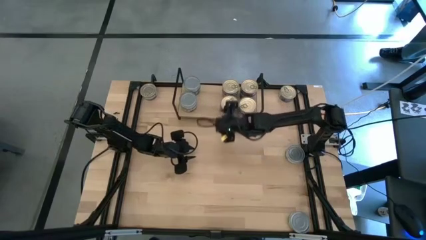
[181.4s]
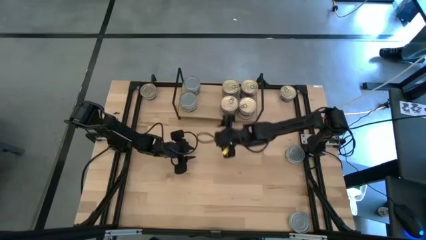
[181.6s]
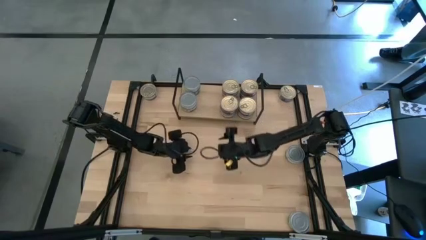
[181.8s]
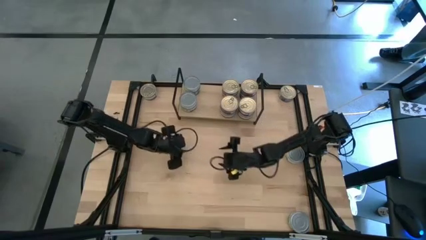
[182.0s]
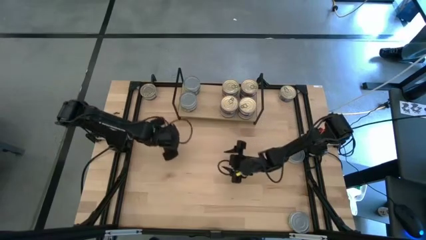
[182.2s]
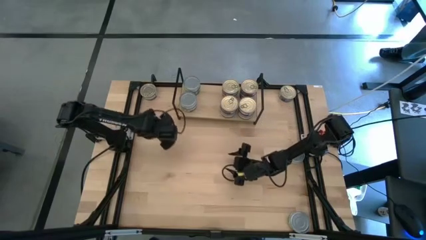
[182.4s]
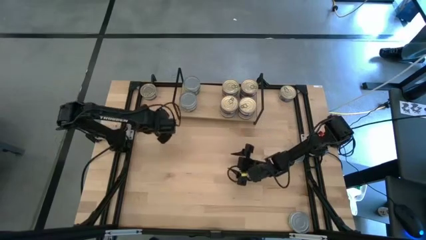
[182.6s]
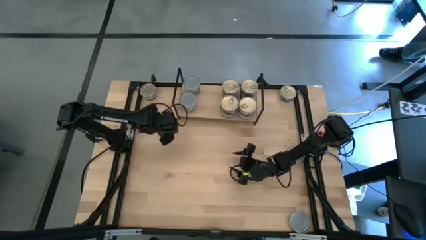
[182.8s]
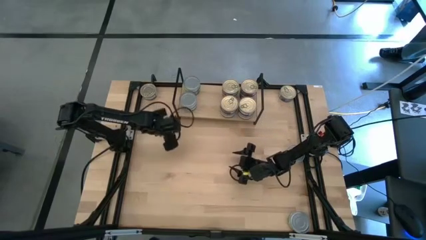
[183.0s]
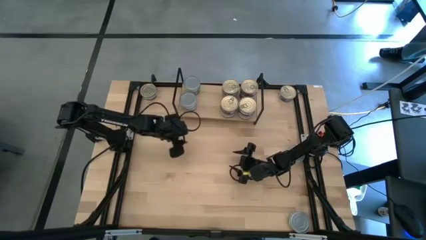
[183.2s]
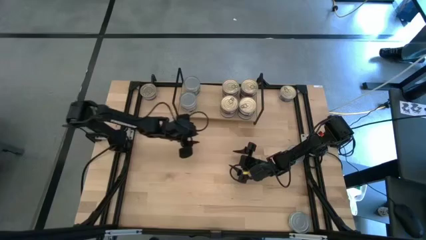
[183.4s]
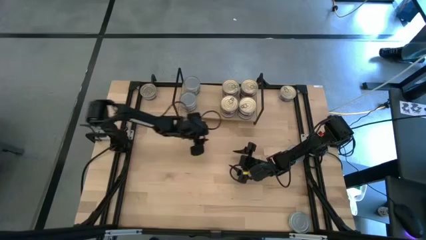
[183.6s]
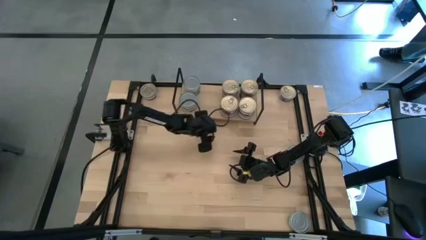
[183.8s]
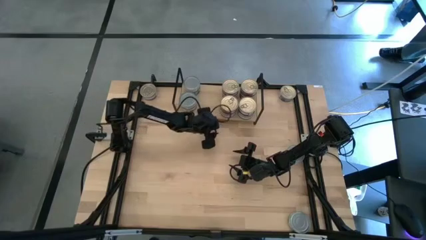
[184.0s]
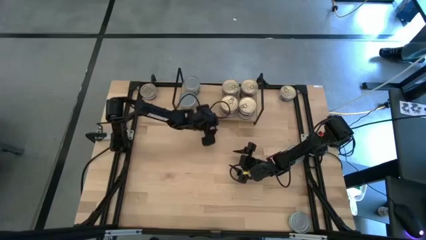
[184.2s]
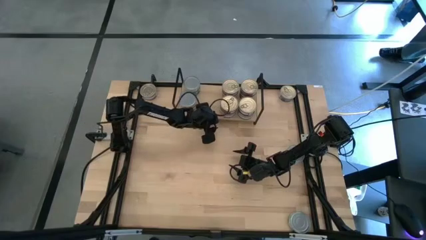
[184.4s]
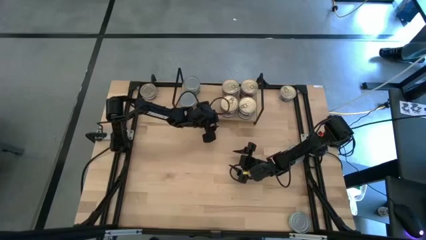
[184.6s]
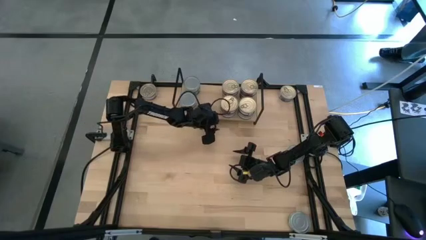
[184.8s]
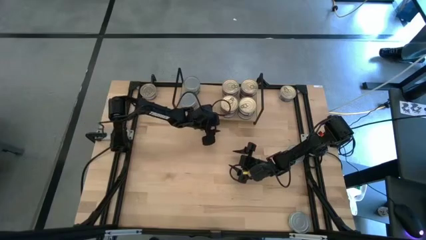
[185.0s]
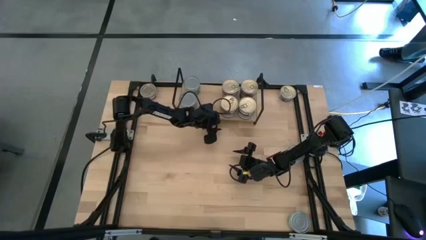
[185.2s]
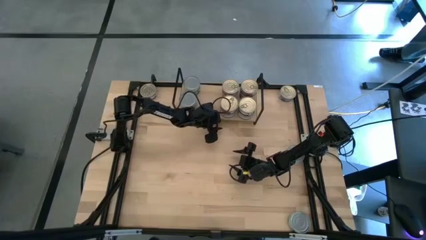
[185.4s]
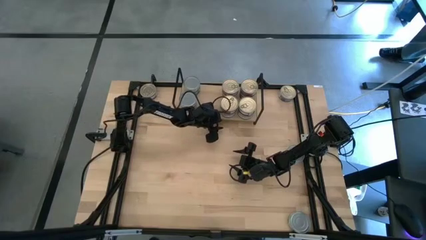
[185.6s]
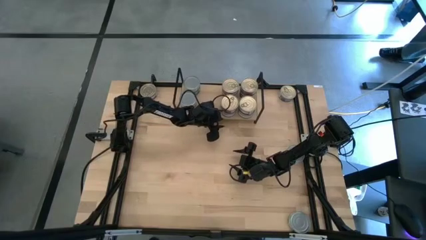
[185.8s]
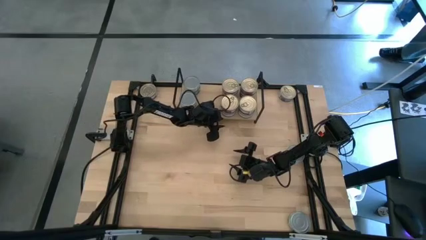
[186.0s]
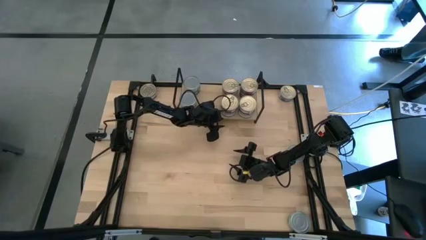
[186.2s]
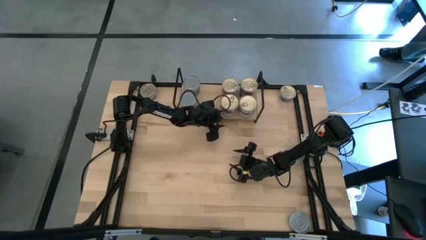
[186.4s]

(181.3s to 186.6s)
Task: Stack canned seafood by type on shelf
Adjust the shelf on the table

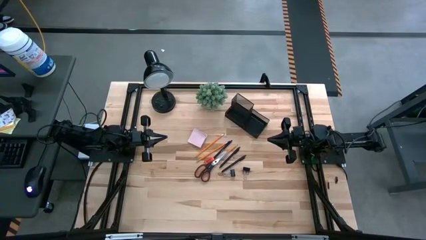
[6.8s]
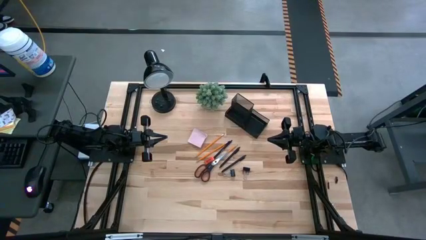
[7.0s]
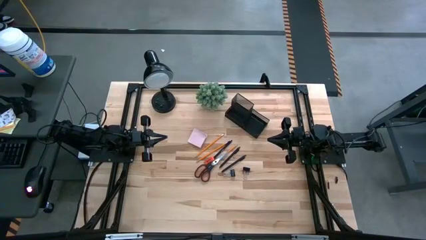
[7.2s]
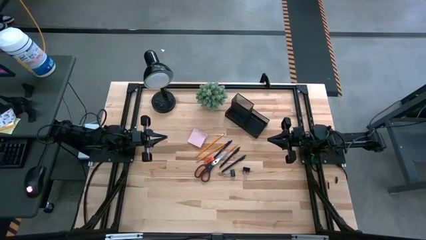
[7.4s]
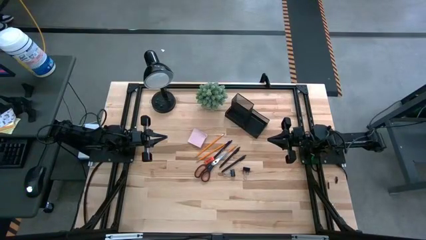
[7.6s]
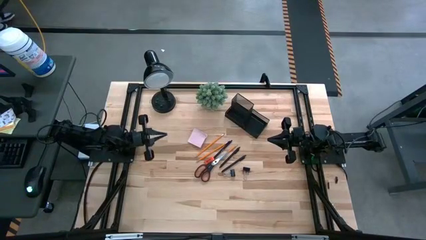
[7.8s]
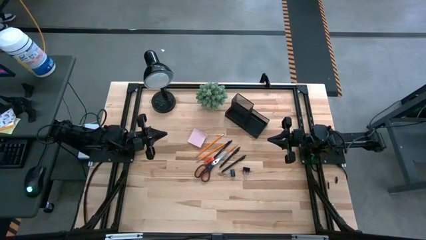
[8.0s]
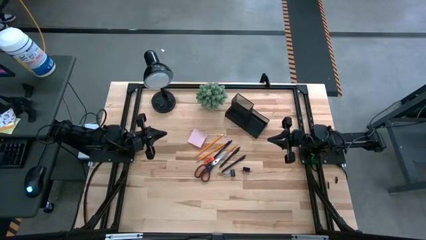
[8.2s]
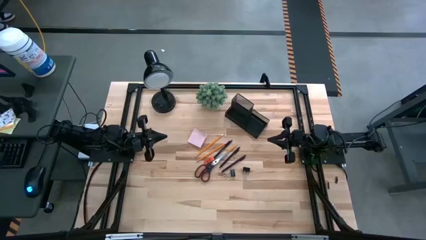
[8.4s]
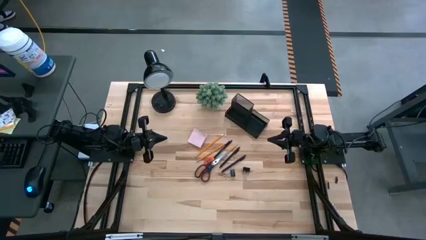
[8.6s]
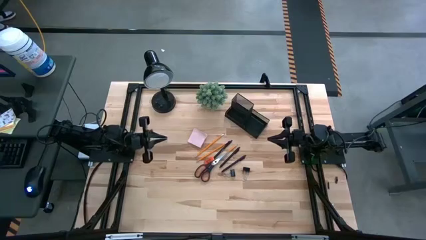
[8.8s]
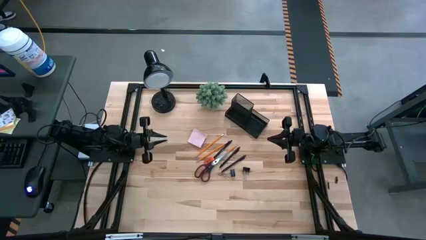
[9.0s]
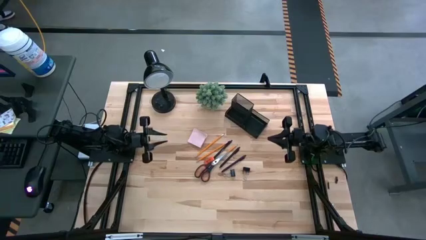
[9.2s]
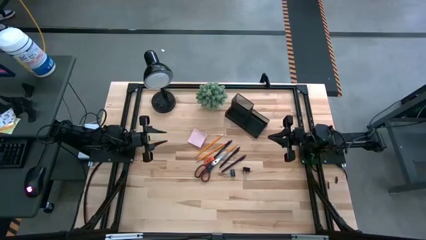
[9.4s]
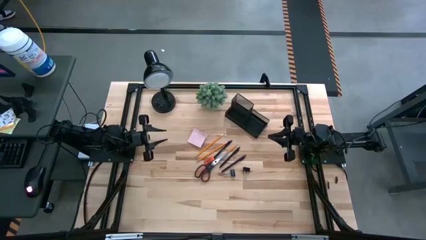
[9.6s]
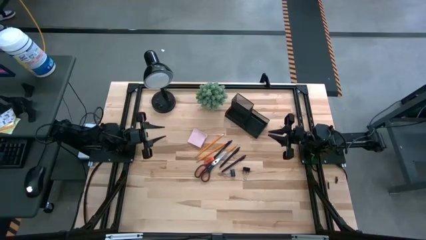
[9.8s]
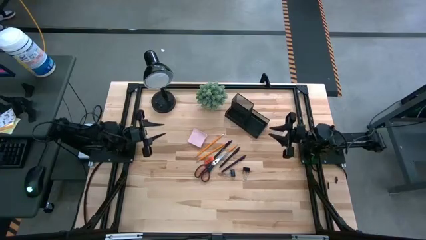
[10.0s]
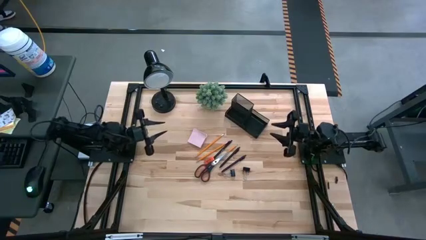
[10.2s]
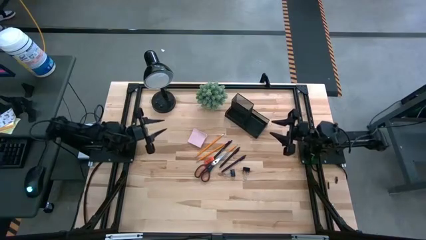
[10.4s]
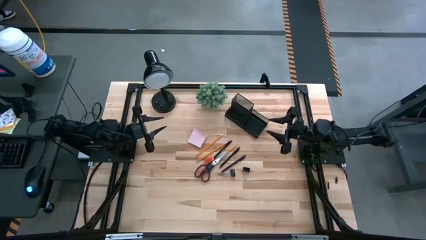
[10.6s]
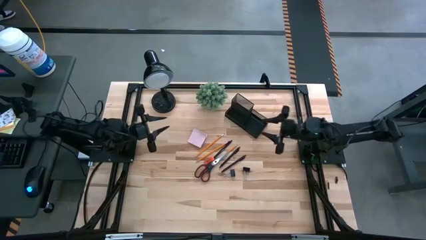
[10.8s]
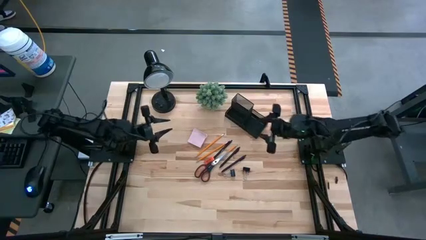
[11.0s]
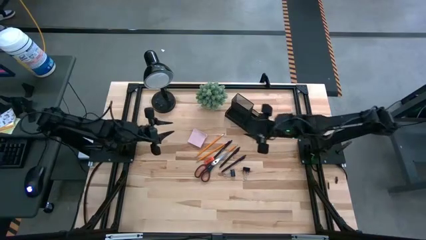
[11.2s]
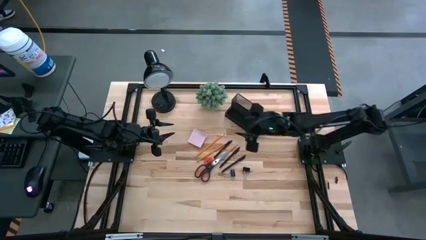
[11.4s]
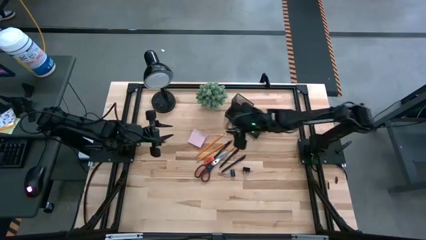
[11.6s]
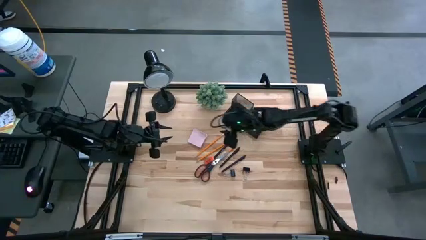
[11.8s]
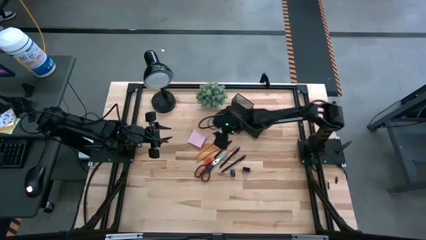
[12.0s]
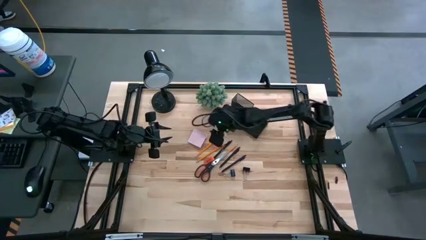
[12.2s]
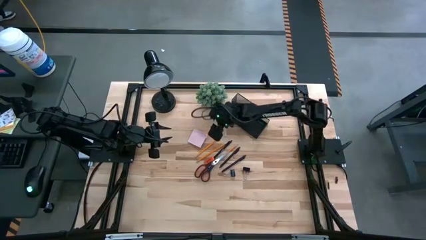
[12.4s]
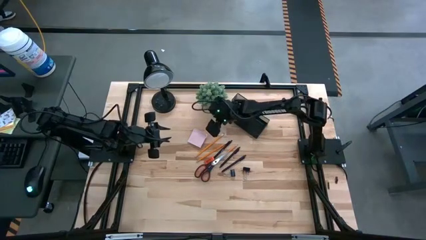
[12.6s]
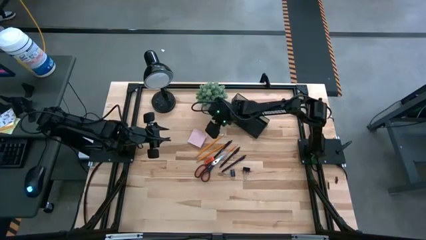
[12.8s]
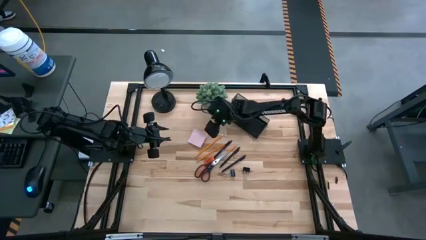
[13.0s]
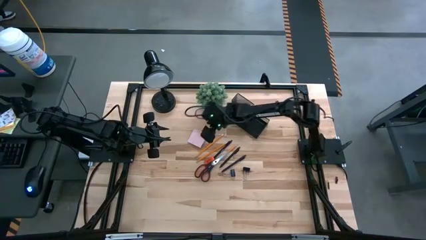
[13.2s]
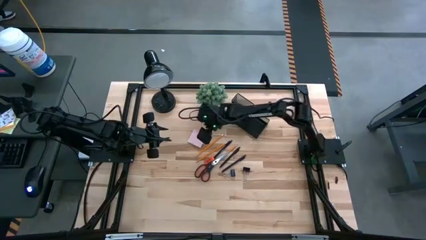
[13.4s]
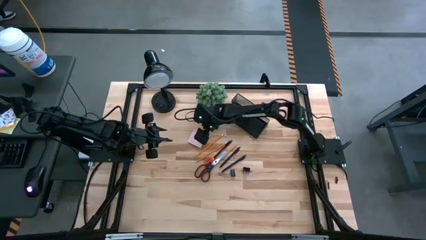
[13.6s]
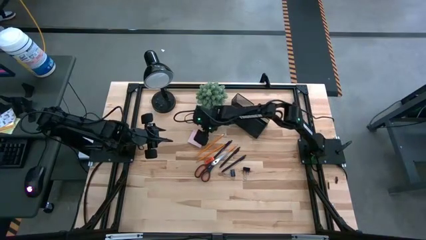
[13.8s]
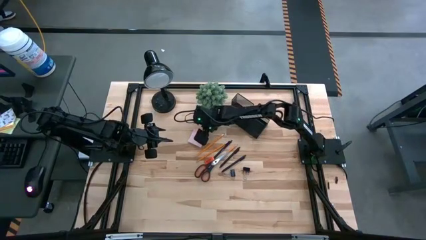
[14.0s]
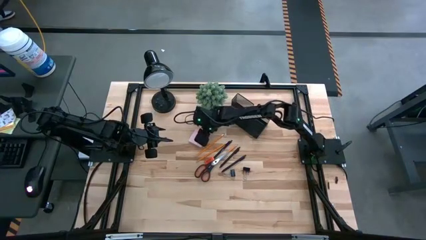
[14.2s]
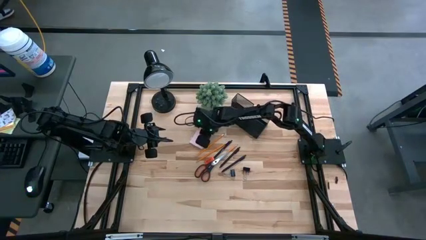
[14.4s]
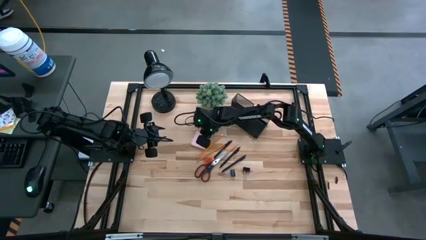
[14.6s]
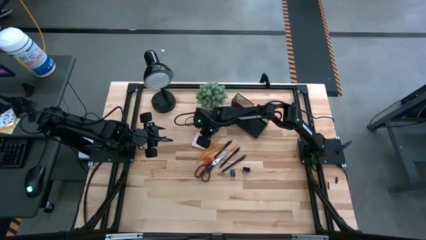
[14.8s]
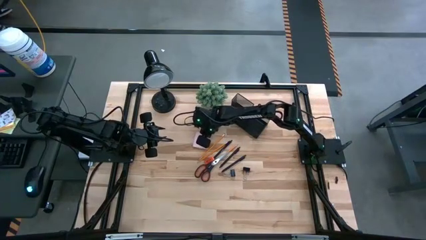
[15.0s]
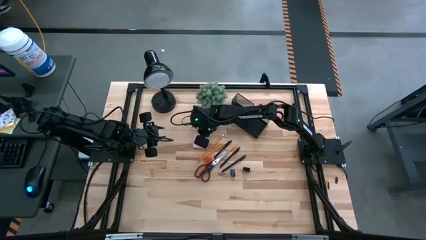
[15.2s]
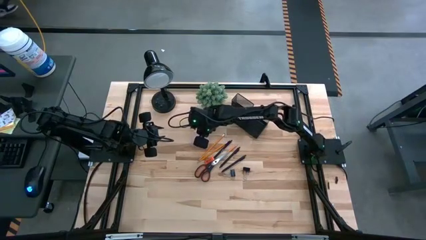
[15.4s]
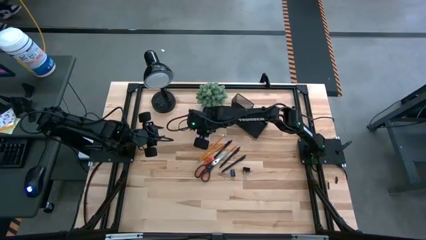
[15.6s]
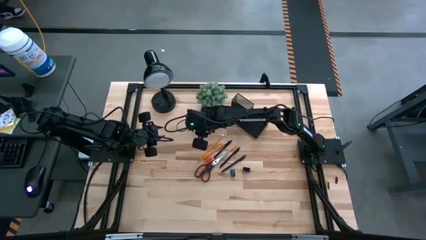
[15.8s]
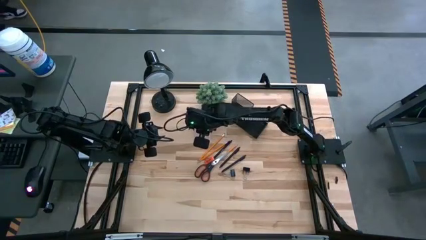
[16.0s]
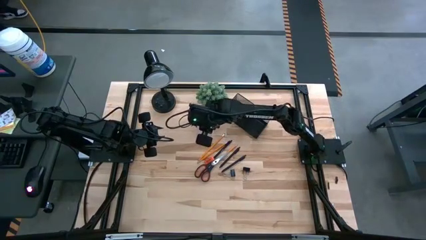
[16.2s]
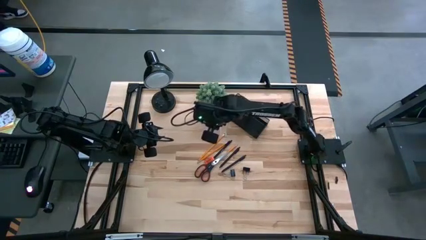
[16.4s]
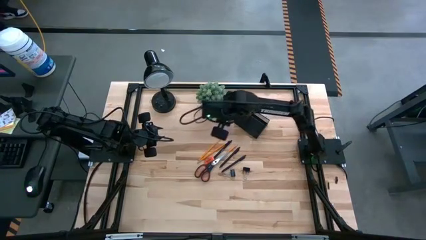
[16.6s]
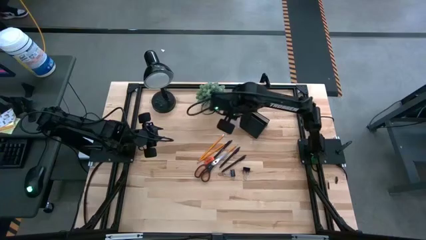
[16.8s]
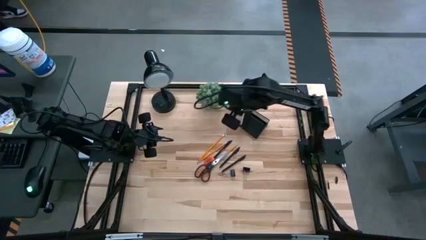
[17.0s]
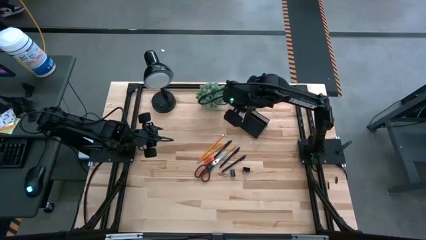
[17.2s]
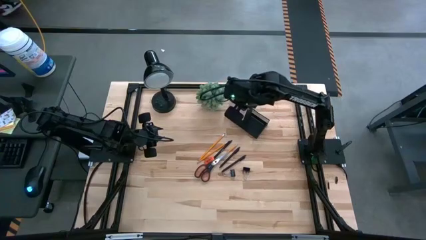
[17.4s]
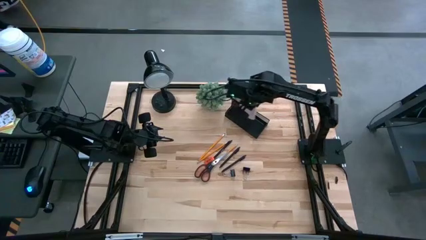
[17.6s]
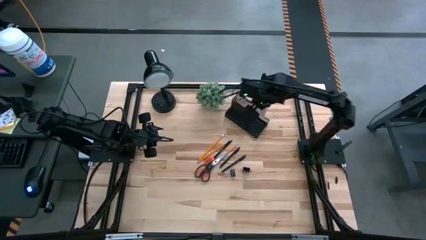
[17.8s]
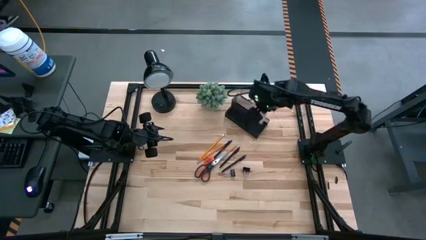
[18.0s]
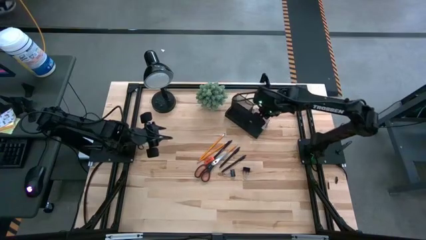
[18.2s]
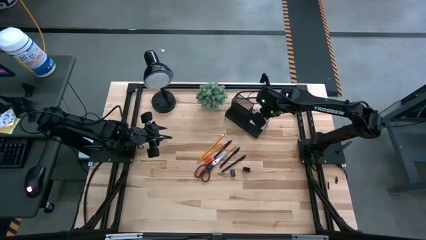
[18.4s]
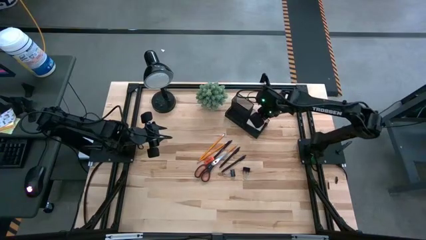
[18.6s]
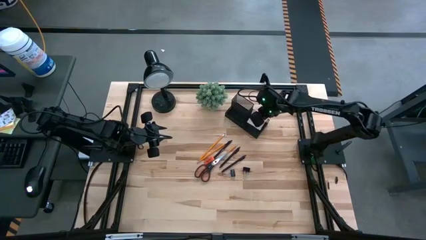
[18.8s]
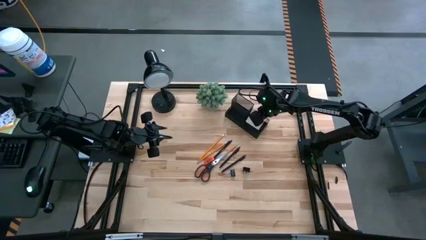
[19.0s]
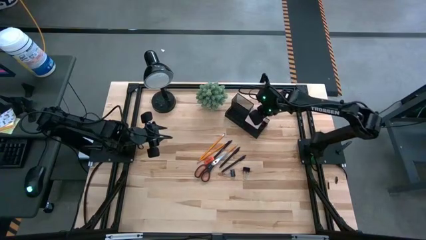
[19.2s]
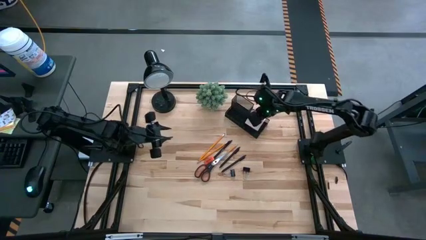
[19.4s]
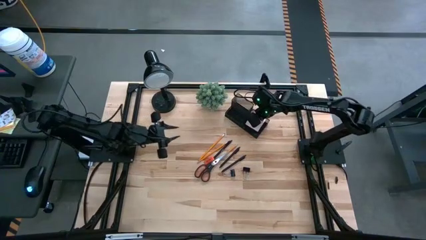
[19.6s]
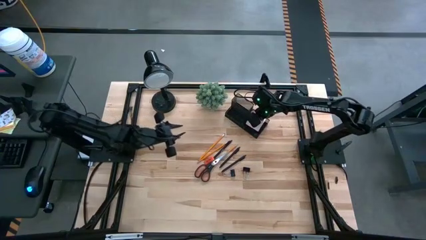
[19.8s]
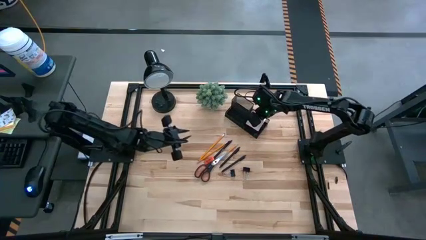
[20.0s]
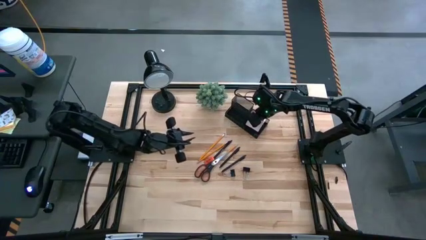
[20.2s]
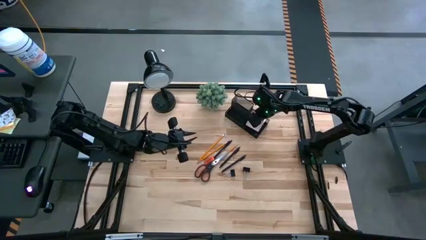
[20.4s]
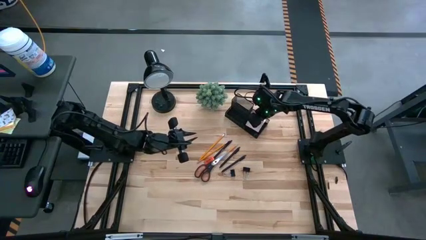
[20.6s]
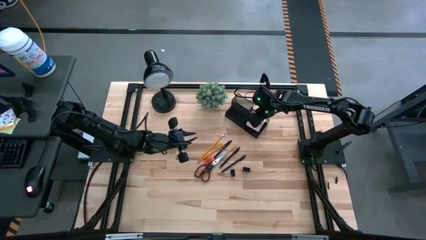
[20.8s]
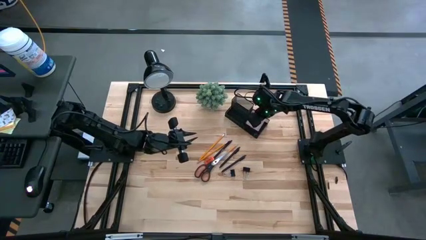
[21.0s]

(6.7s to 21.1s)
Task: Pick and place office supplies into organizer
Put the pink sticky note into the black desk organizer
